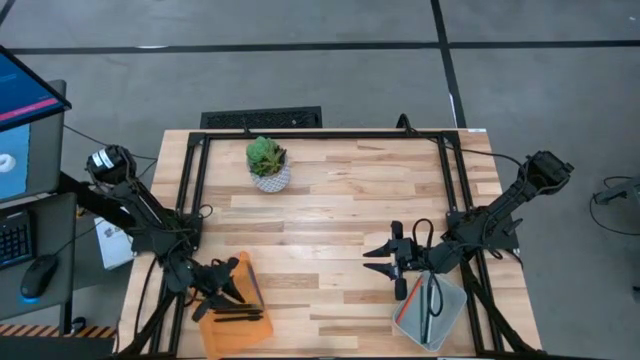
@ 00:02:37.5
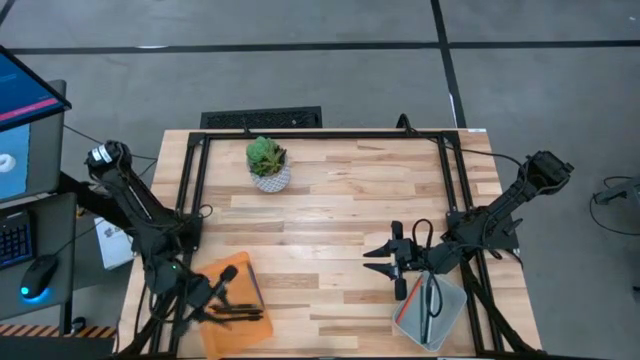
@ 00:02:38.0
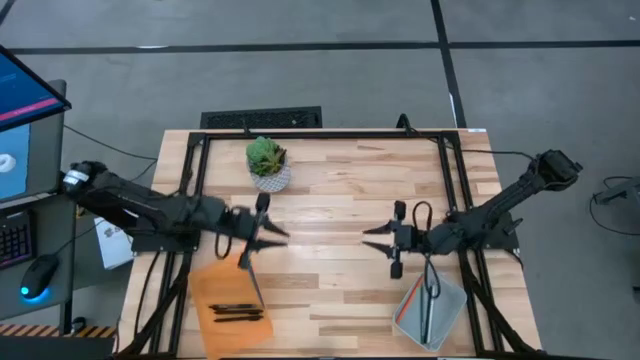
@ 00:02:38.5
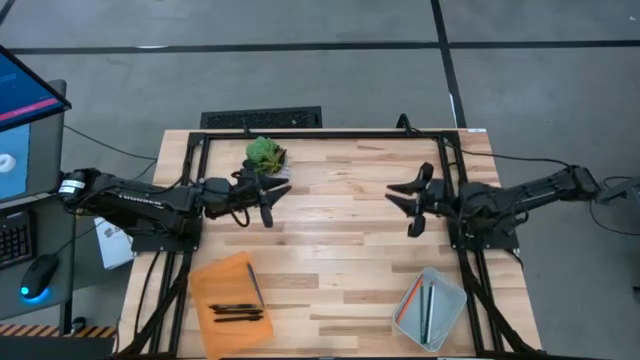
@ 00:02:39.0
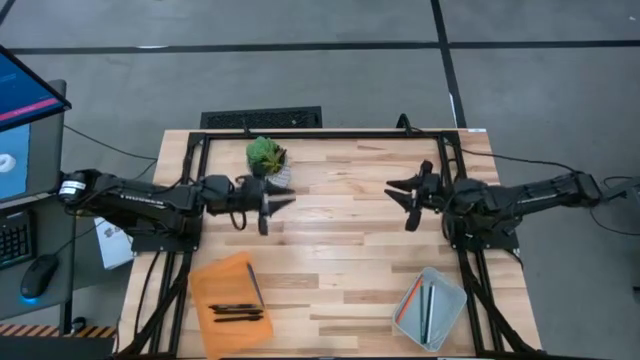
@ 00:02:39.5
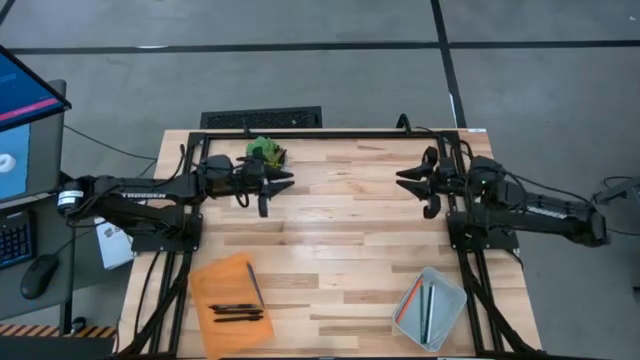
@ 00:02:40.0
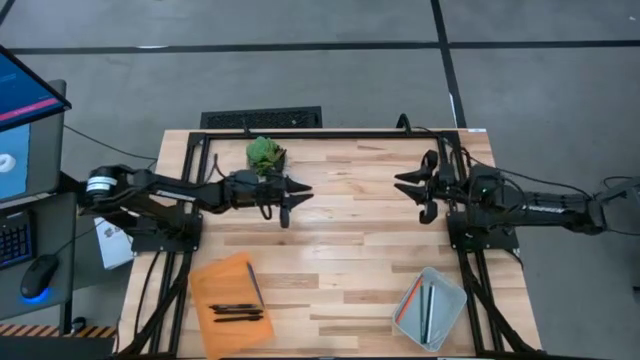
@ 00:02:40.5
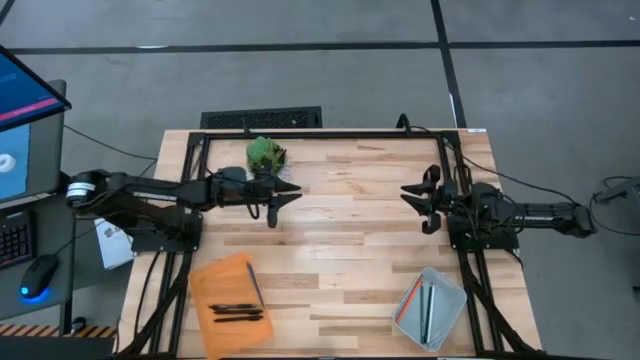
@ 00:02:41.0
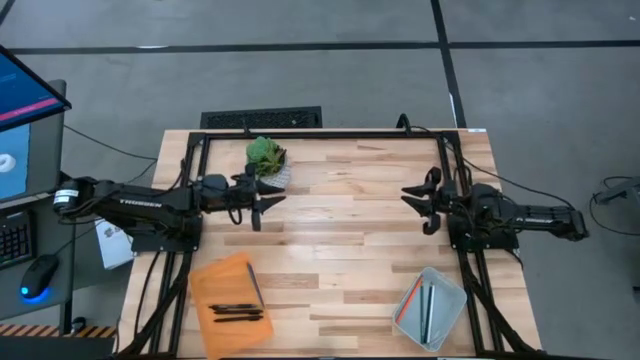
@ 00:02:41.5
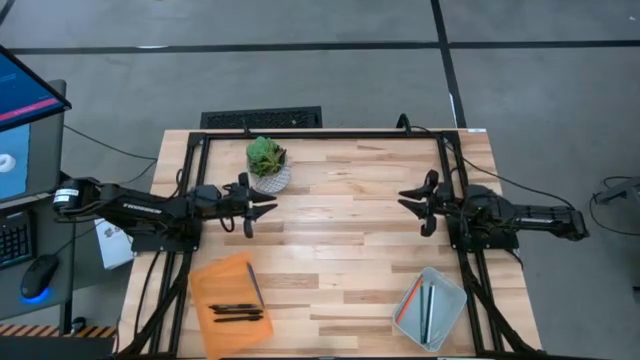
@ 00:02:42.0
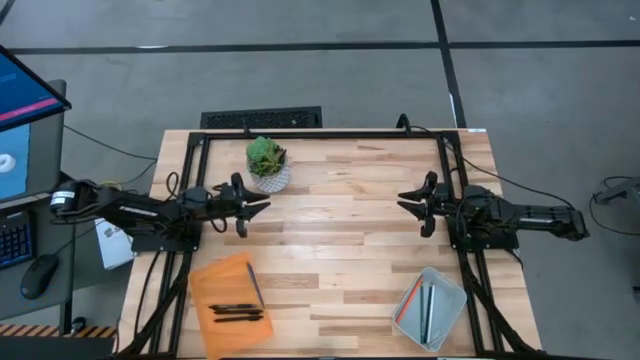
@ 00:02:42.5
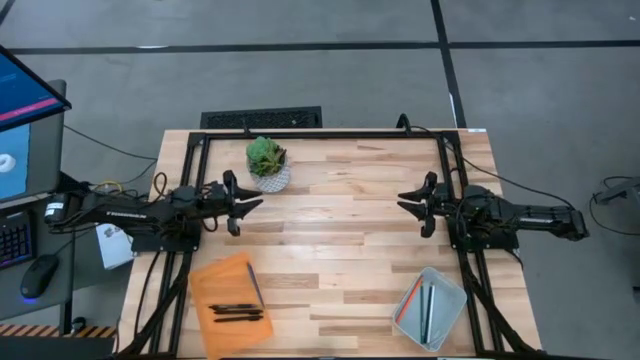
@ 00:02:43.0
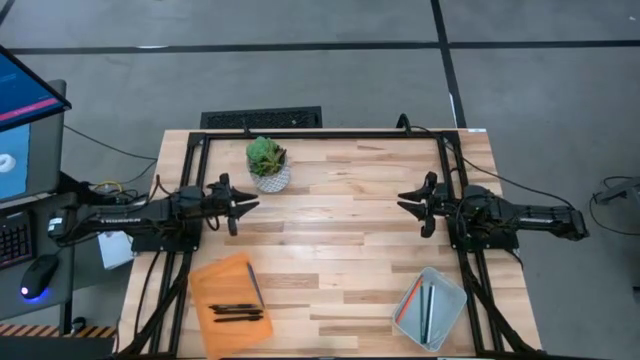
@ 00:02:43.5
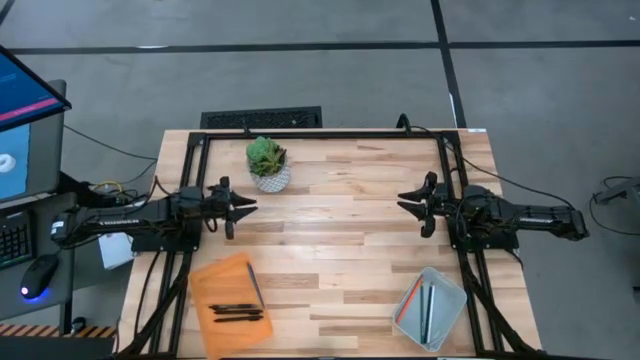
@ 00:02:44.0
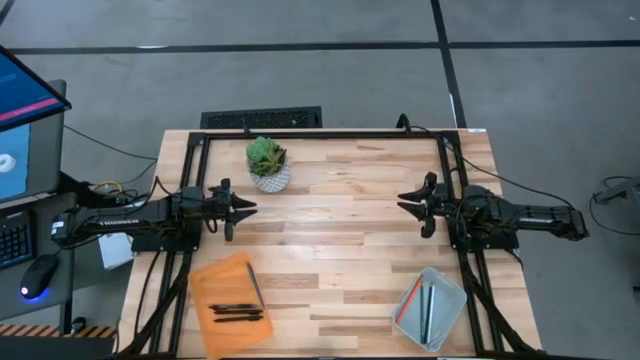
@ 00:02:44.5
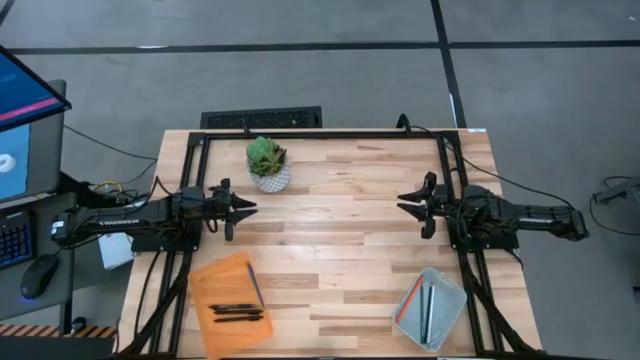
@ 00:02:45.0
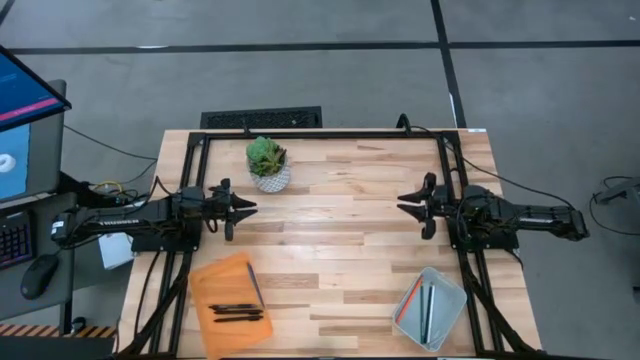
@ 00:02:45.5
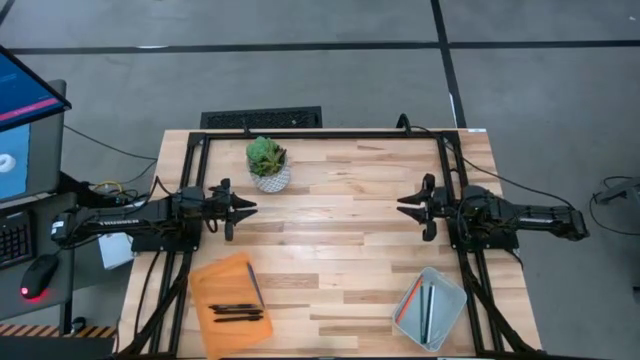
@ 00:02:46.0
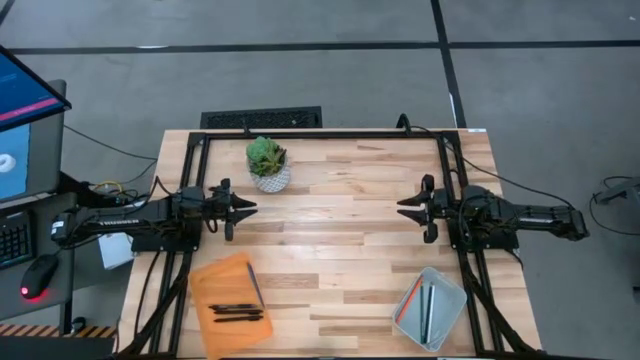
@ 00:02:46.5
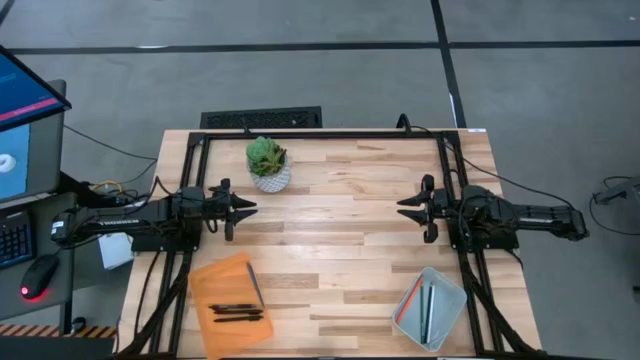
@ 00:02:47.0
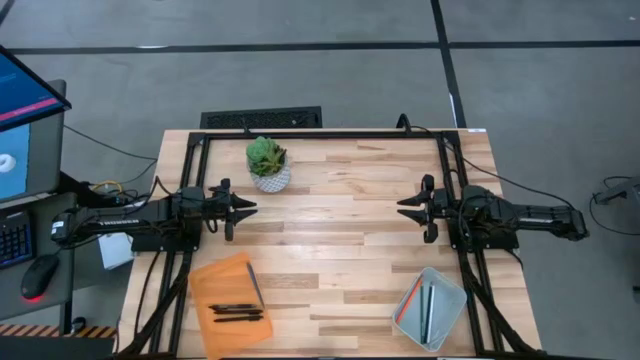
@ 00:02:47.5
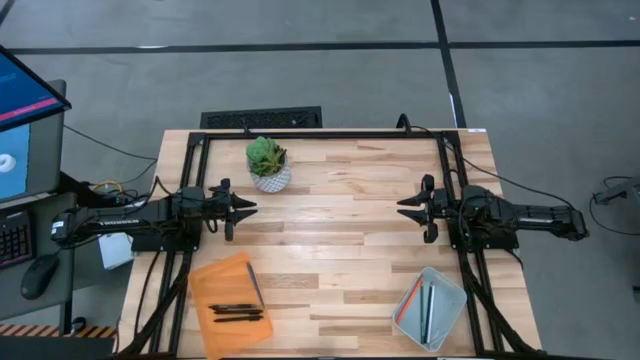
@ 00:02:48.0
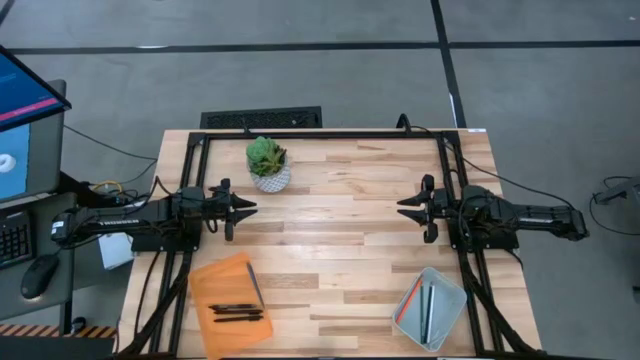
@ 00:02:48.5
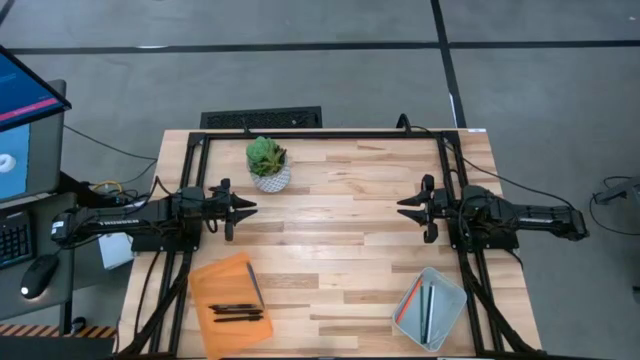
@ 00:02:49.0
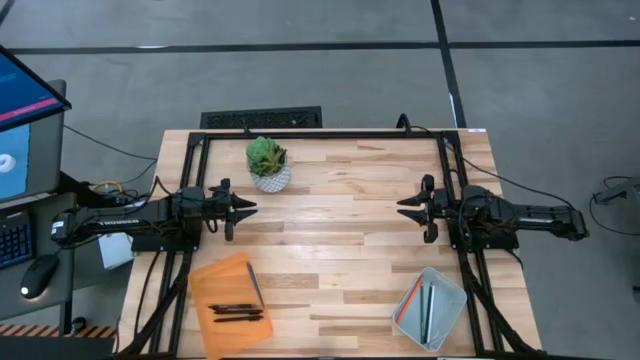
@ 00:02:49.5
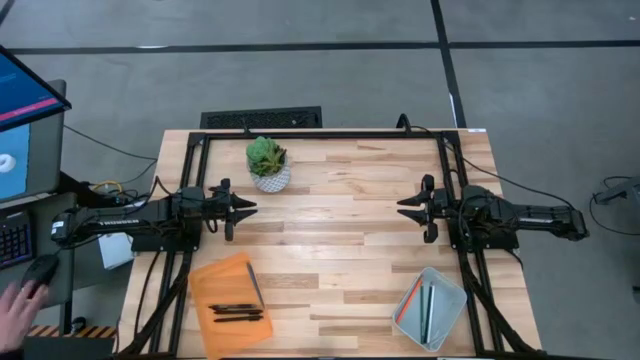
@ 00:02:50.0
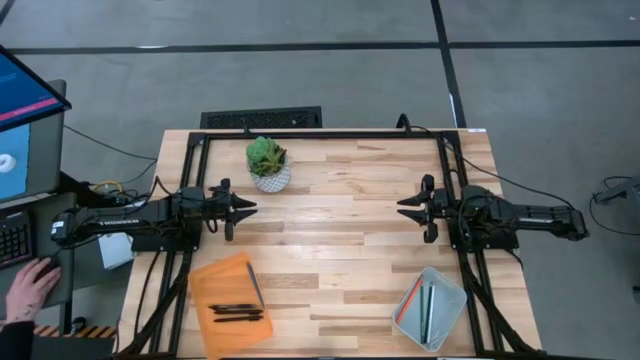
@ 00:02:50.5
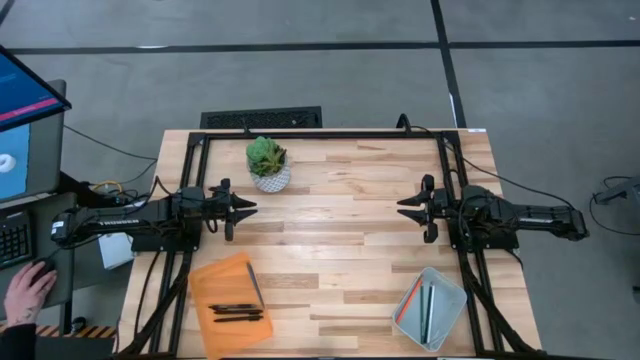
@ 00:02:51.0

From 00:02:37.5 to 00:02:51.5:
Task: Sort pens & pencils
Return to Home Position
